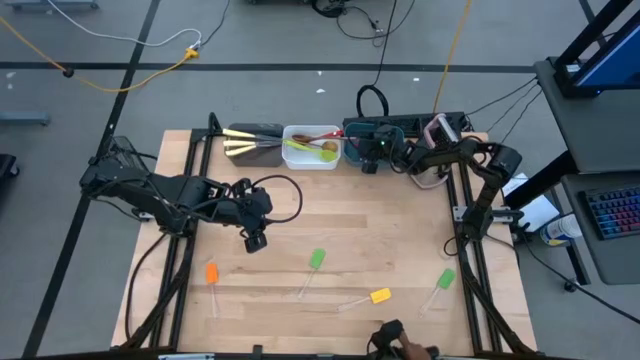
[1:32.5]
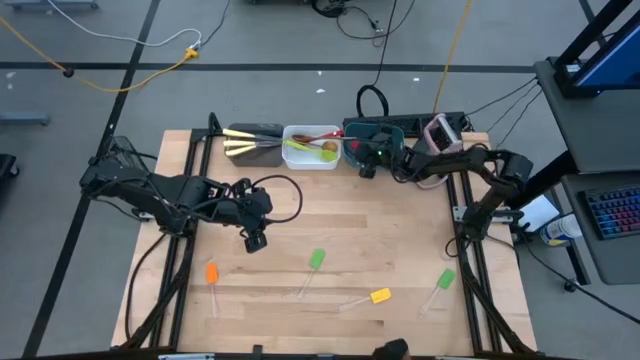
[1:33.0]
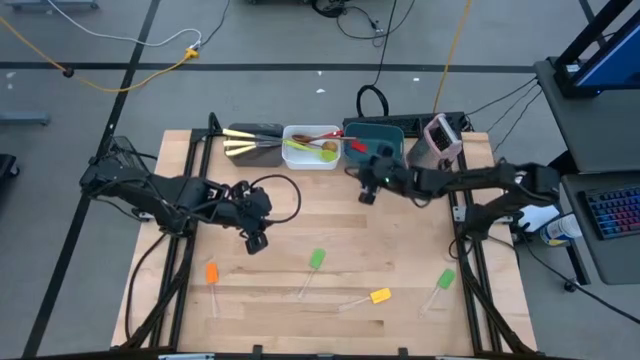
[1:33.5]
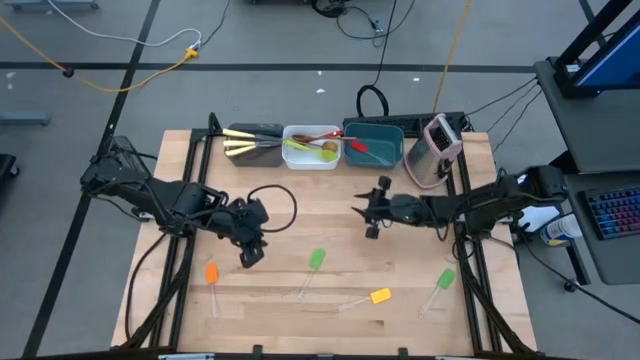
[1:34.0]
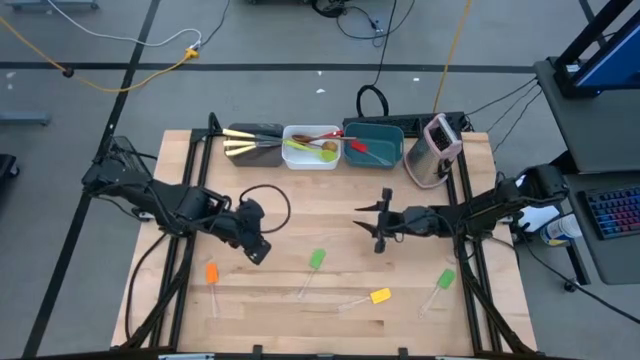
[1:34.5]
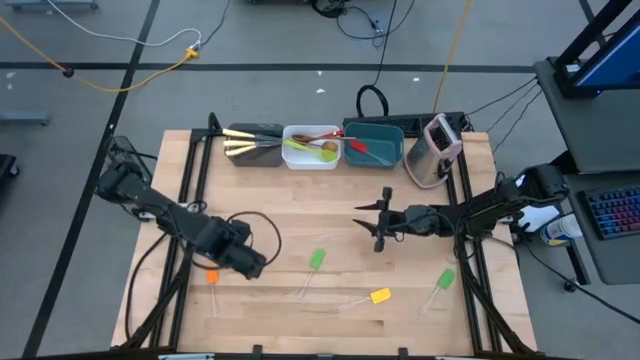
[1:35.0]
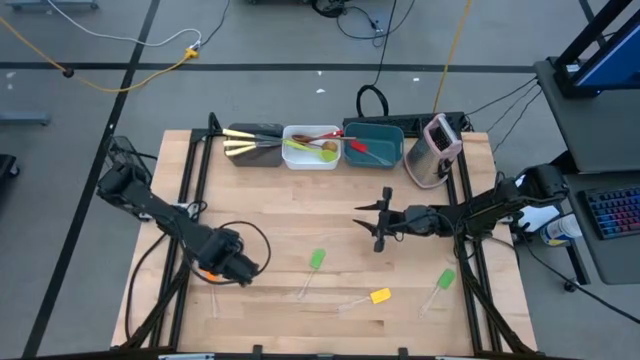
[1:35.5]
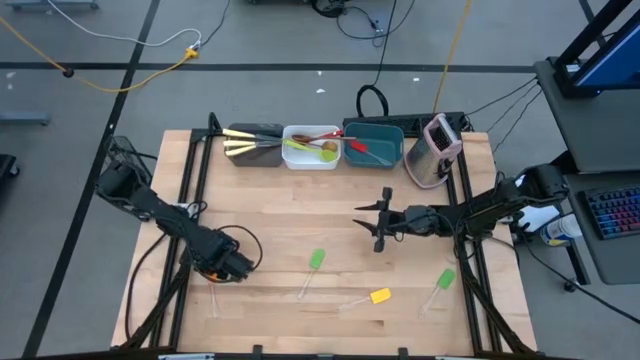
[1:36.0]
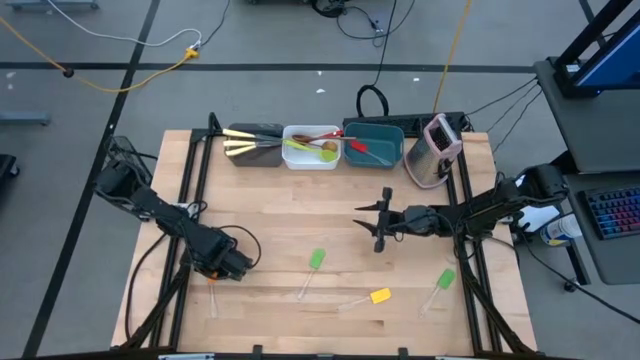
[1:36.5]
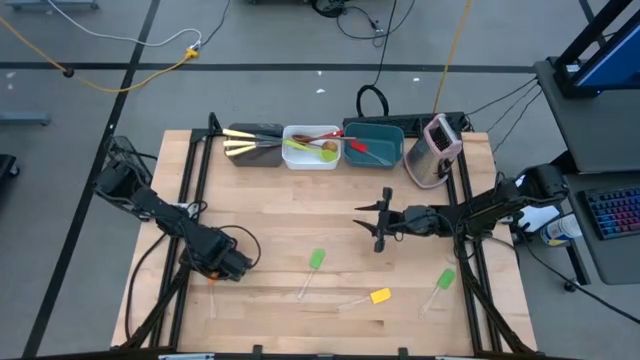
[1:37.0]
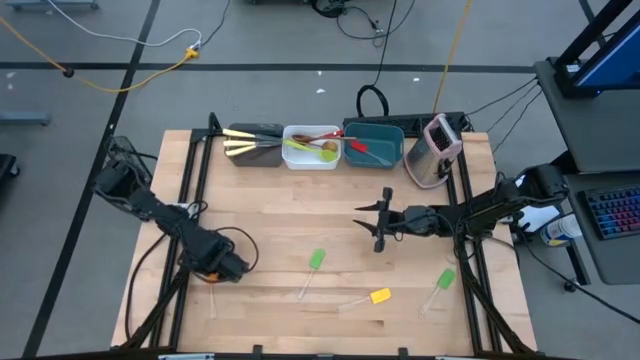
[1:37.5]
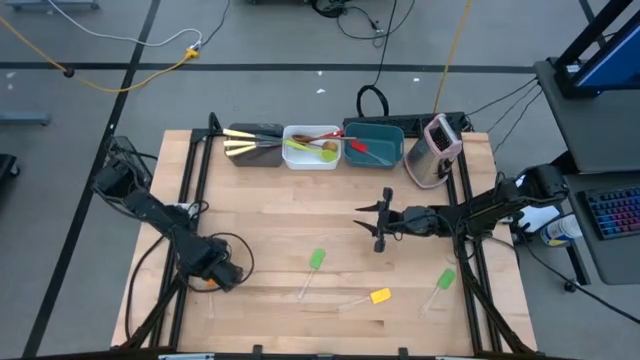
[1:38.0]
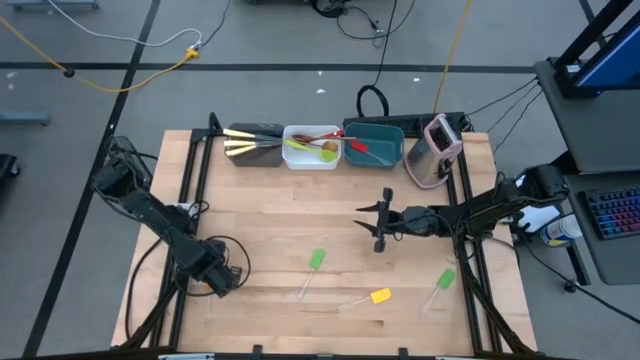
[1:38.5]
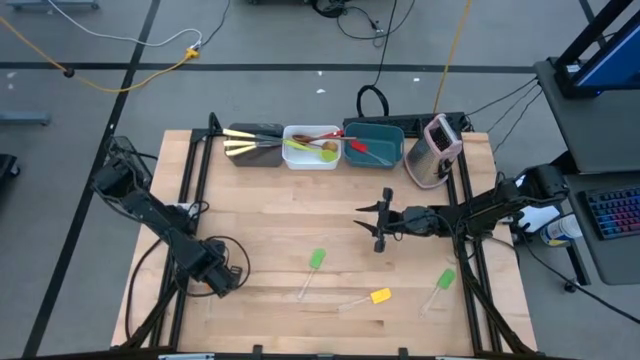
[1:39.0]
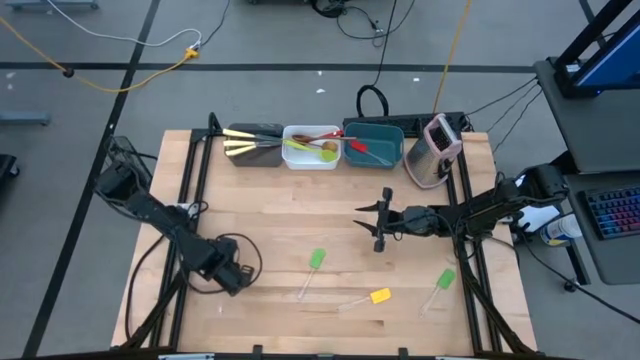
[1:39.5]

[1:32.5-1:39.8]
Task: Pick & Place Kitchen Items
Put the orange spatula into the blue bin

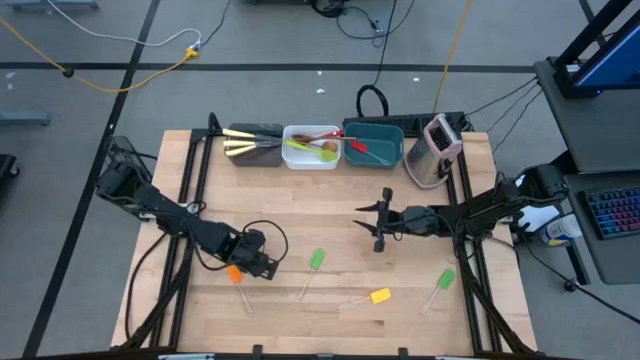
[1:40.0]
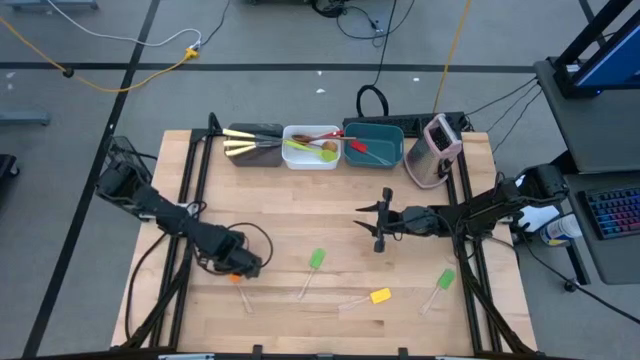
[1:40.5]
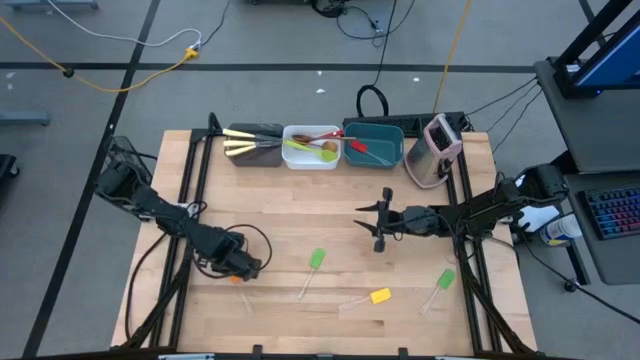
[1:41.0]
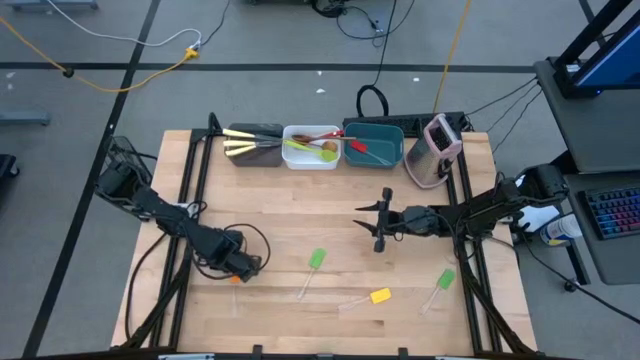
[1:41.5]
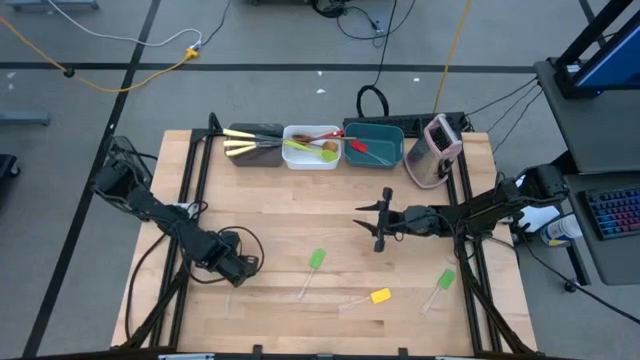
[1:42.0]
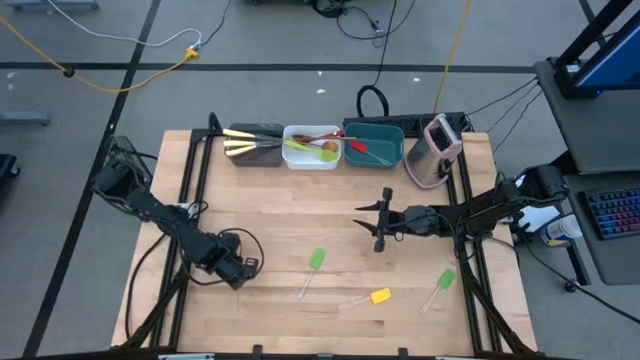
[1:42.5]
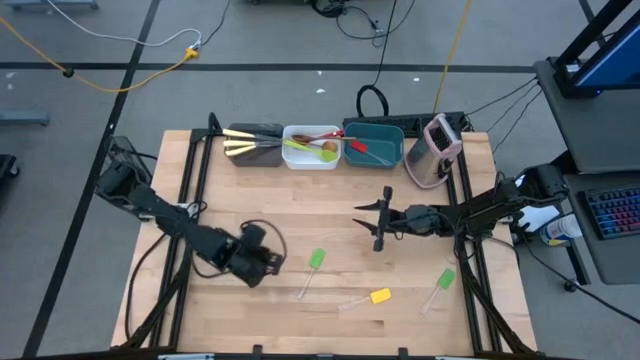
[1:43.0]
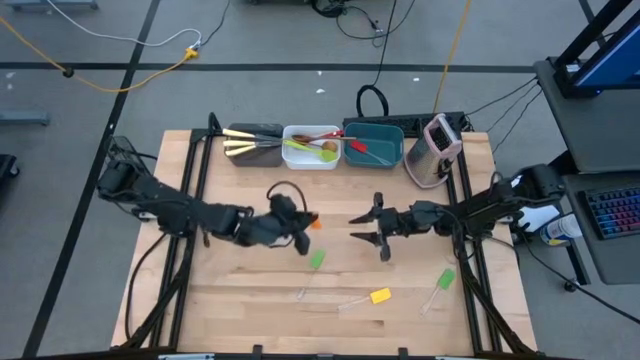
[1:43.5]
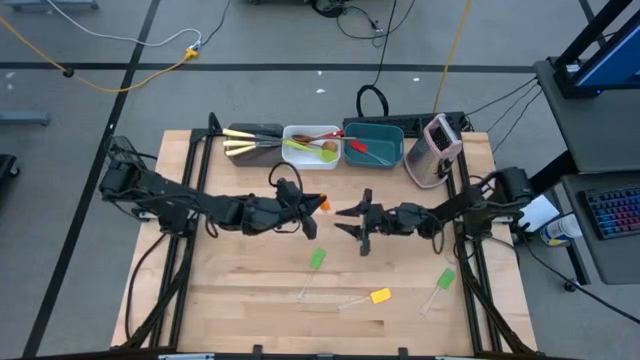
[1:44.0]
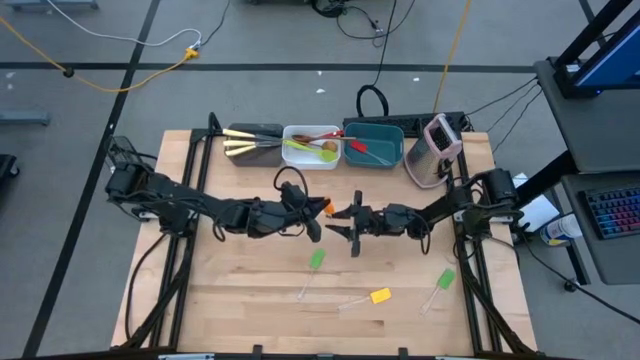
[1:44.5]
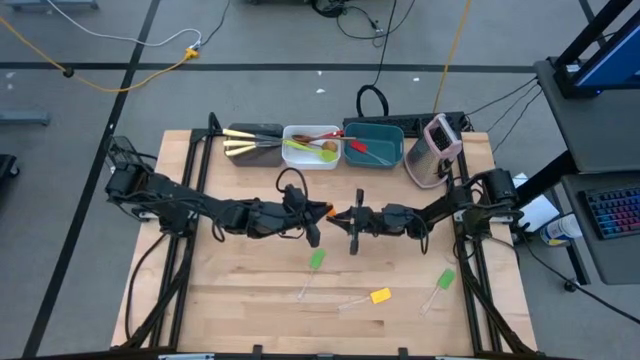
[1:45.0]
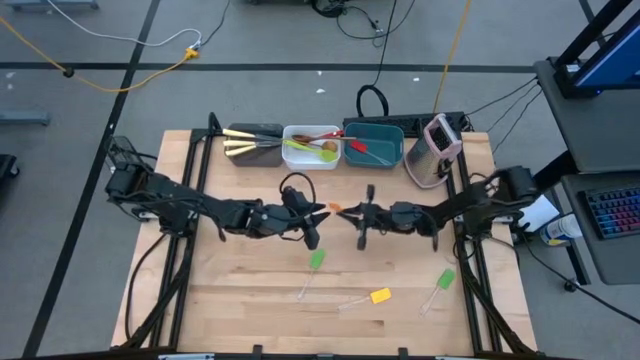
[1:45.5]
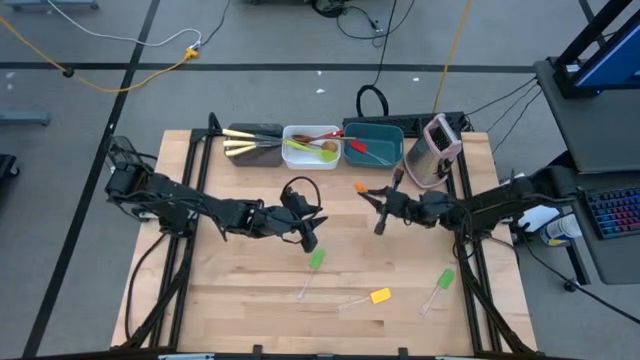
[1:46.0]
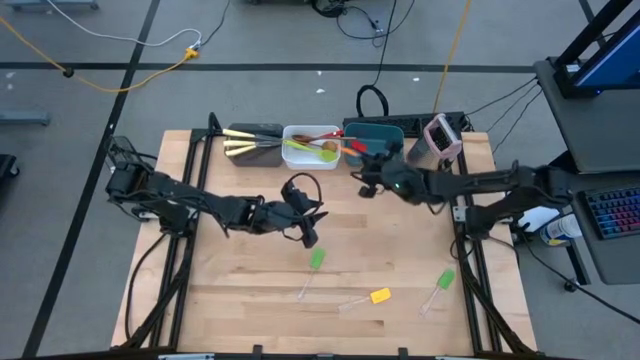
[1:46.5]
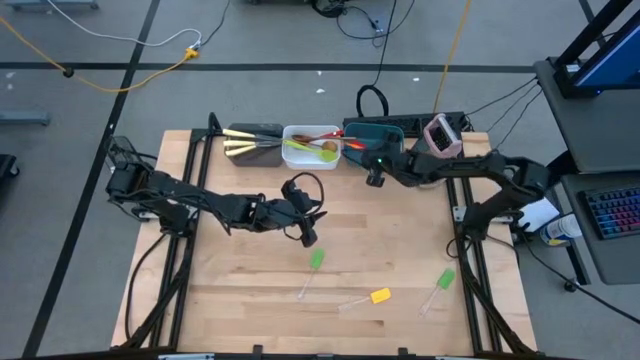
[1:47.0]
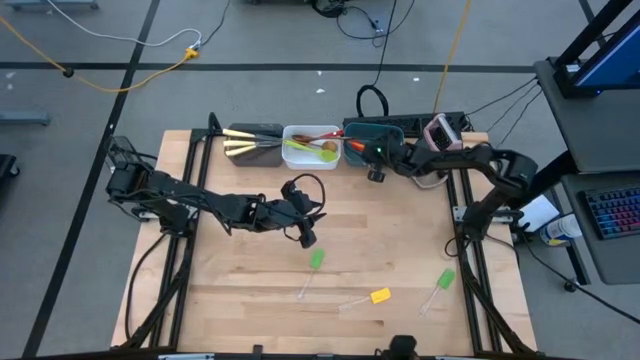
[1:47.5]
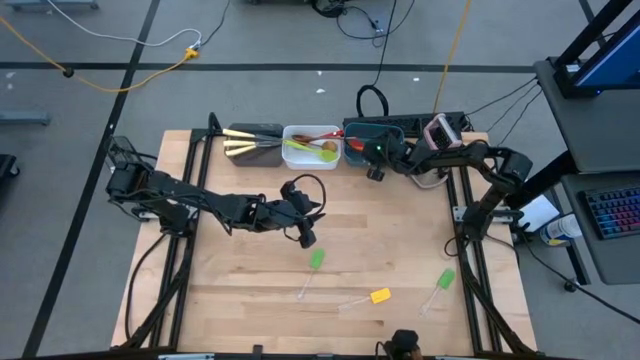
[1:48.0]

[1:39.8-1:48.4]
Put the orange spatula into the blue bin

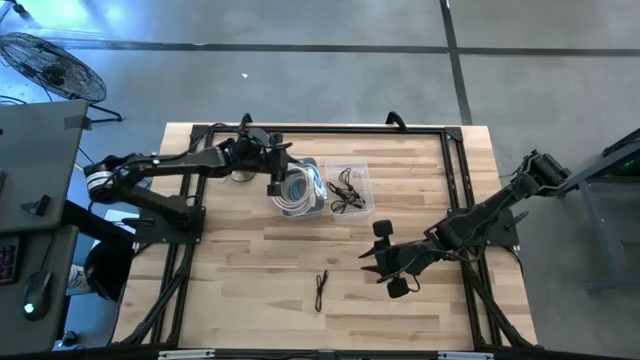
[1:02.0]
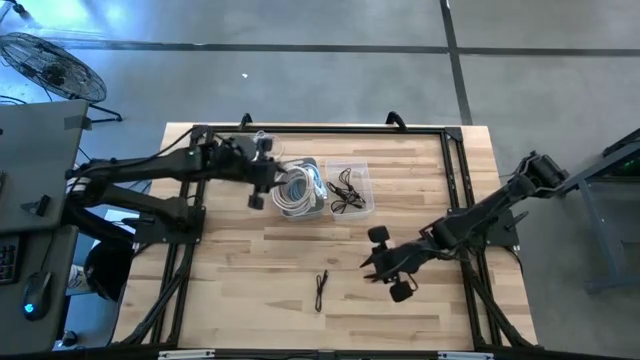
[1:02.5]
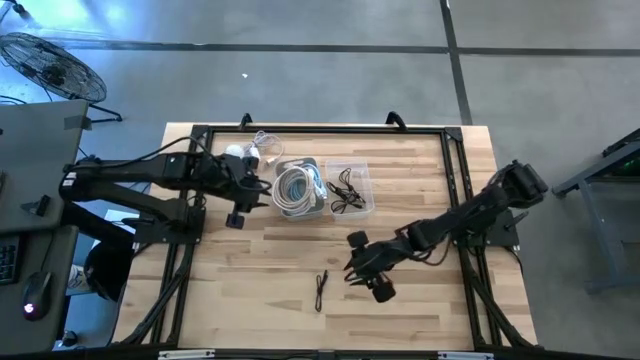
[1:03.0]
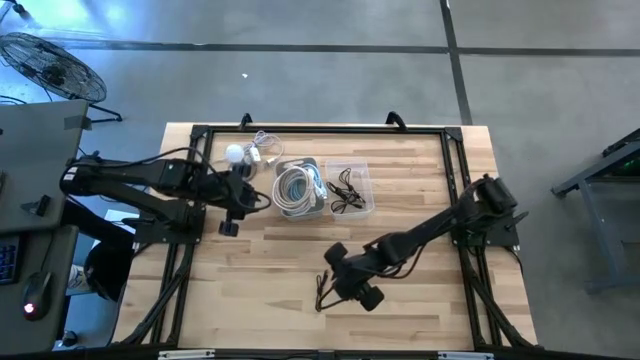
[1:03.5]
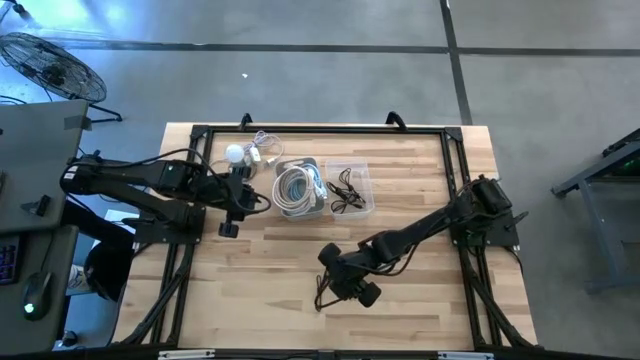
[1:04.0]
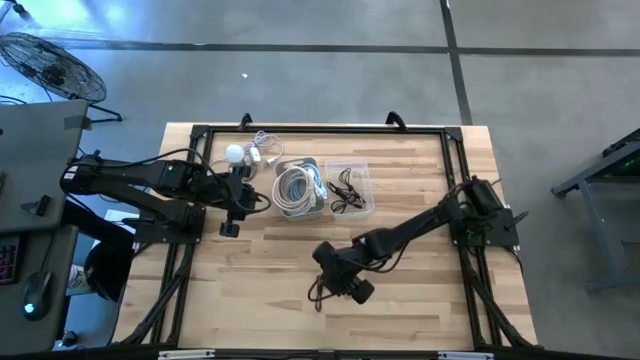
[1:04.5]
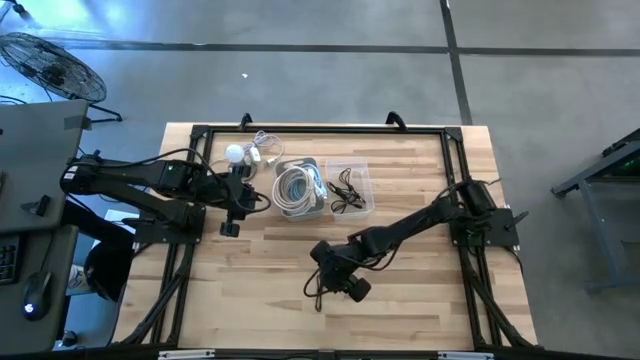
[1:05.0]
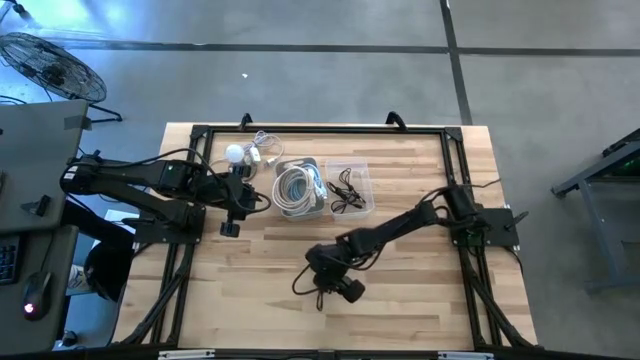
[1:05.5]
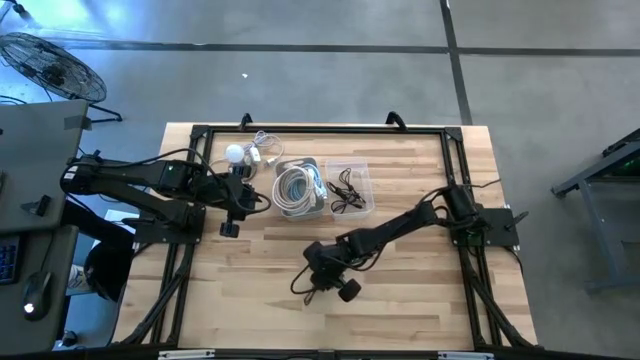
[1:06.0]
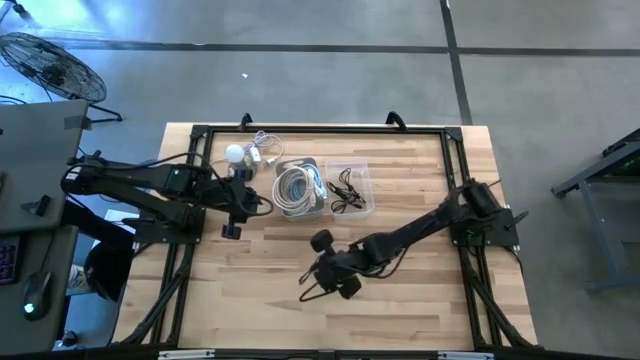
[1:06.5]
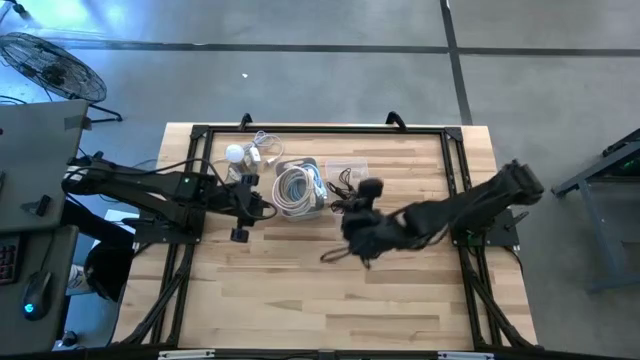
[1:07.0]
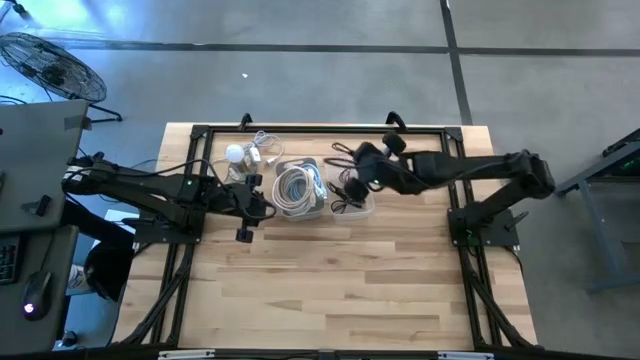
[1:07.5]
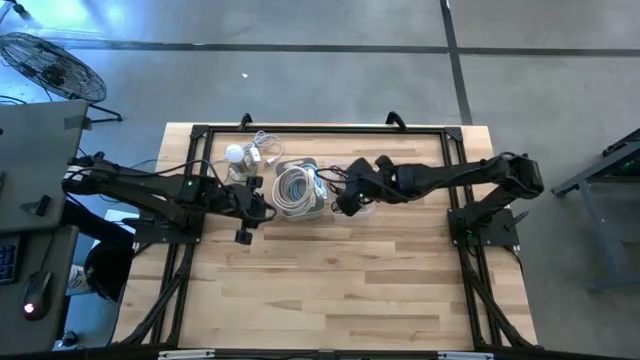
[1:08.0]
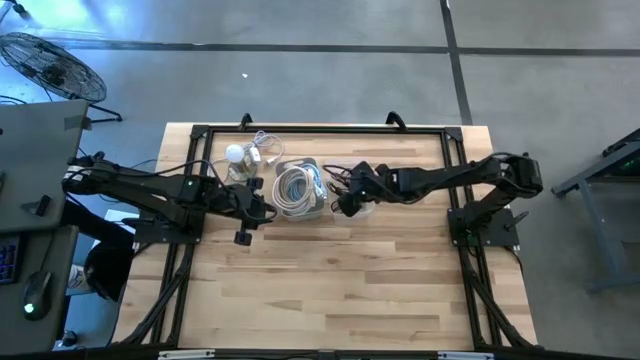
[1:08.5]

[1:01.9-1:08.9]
Task: Pick & Place USB Port
Put the black charger cable into the transparent bin
